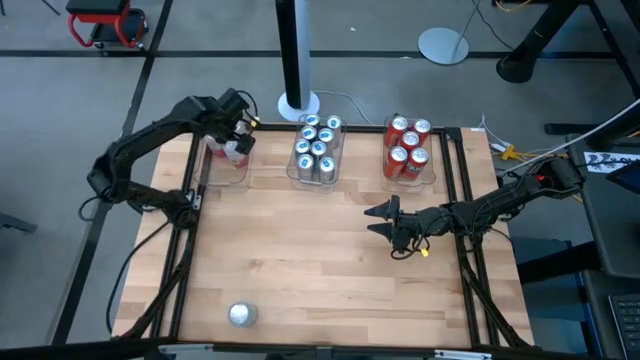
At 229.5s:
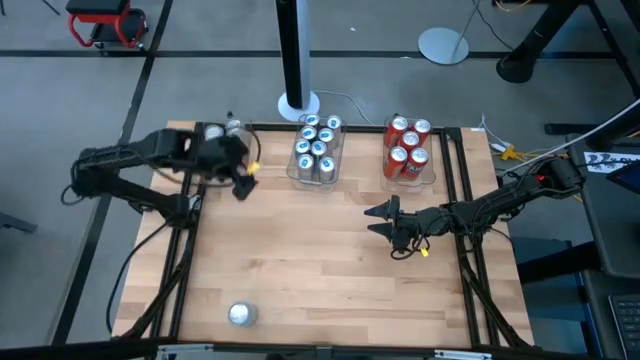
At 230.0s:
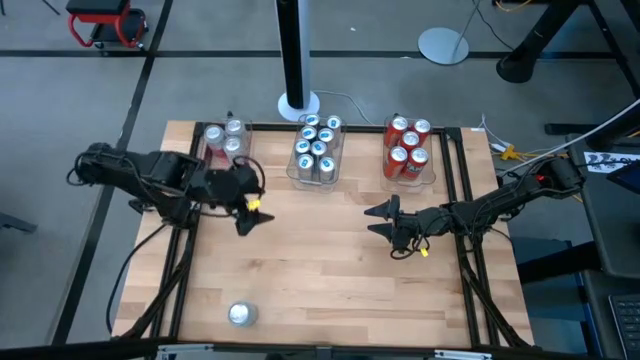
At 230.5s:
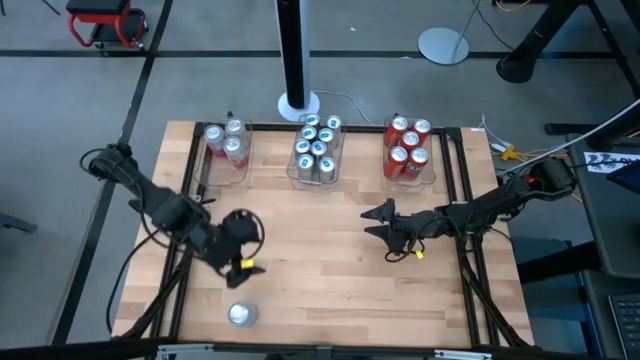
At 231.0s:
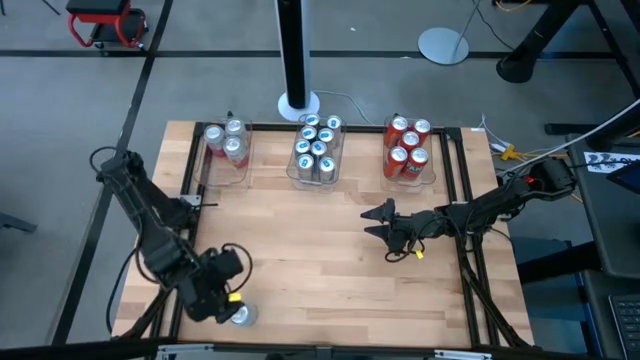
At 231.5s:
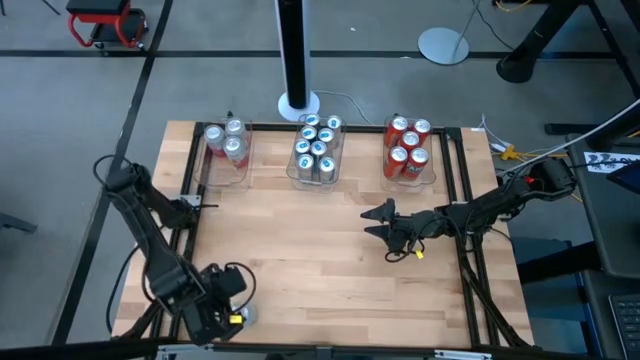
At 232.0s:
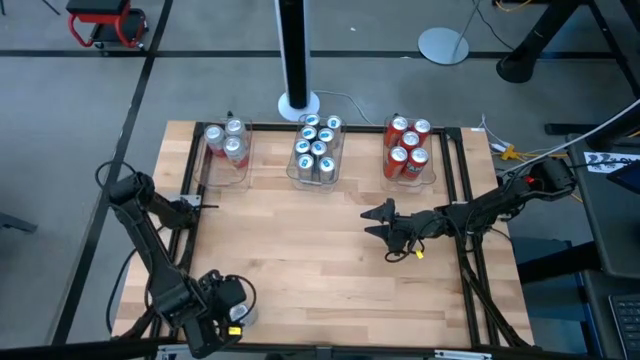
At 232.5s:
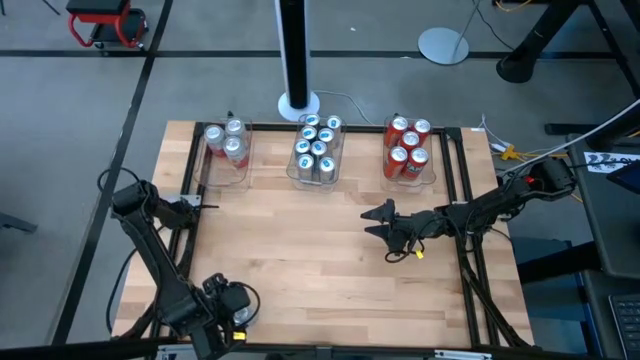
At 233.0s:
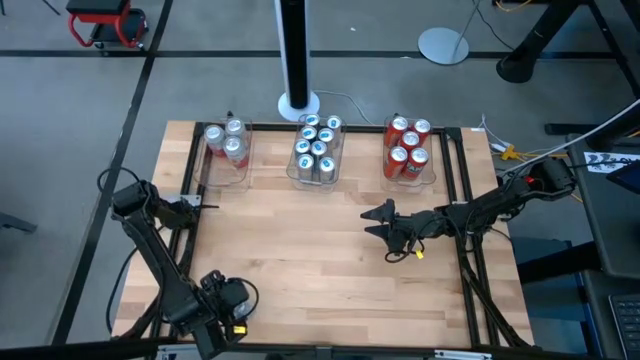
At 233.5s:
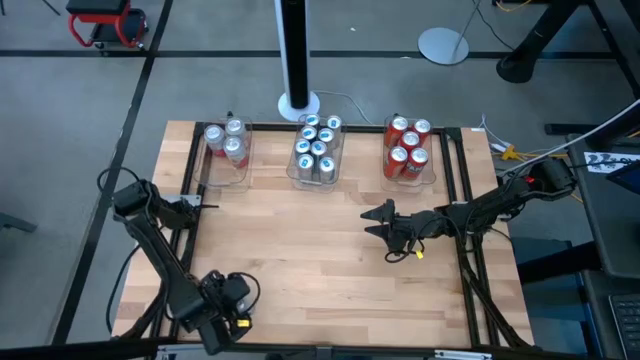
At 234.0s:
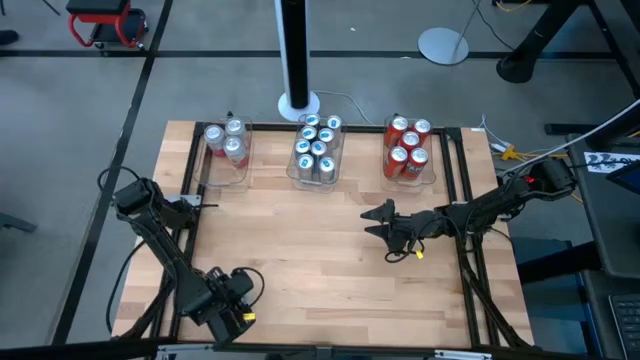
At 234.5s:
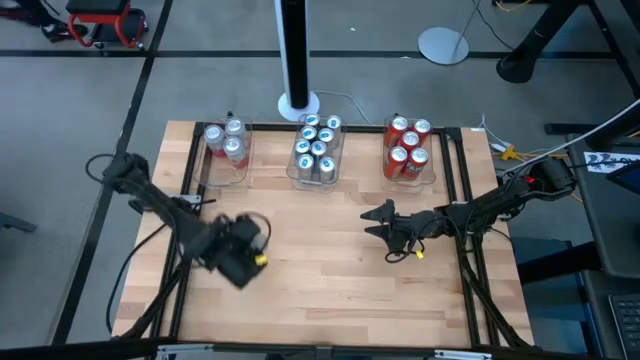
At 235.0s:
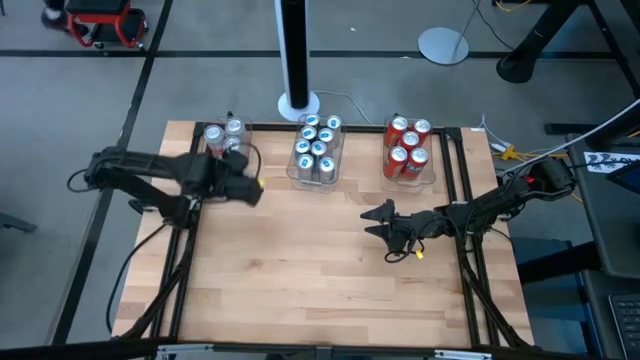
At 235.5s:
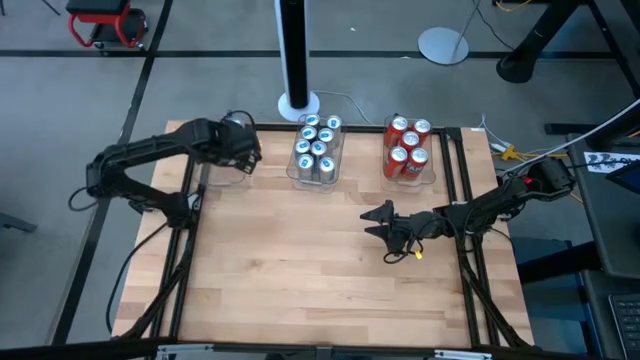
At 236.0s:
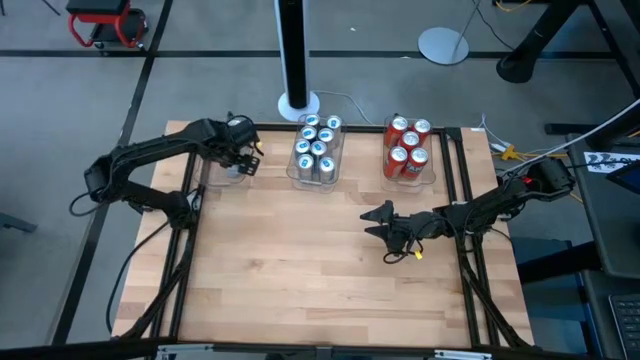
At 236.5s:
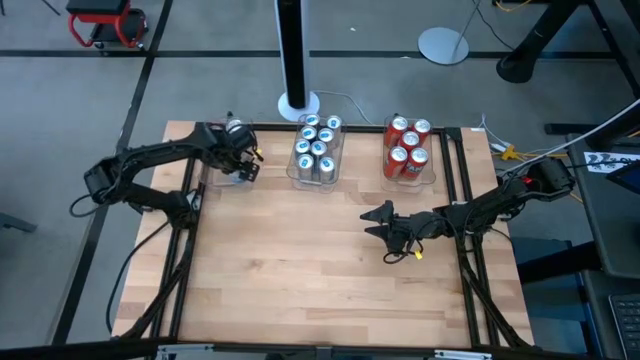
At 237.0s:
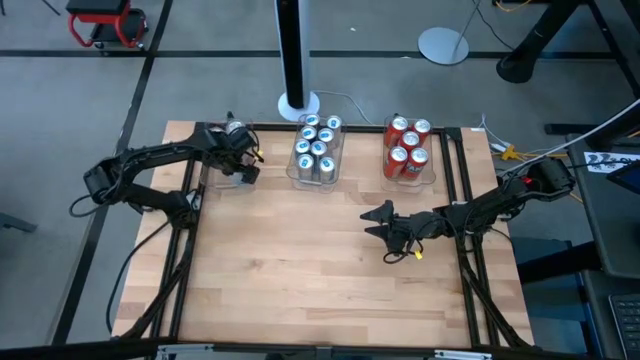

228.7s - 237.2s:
Task: Sort soda cans
Put the blue-white soda can into the left transparent bin

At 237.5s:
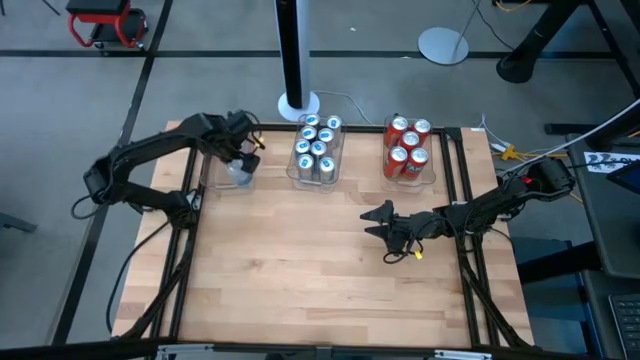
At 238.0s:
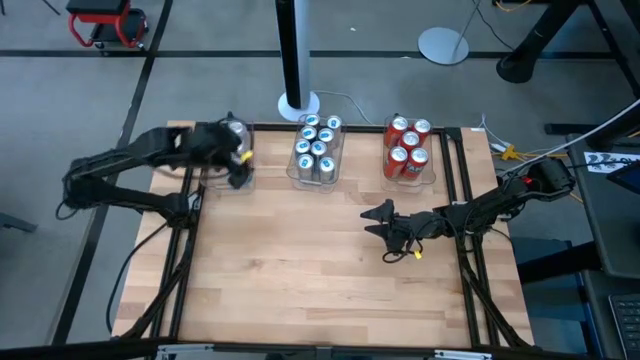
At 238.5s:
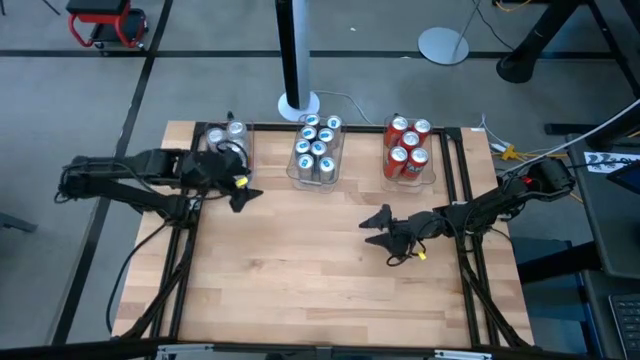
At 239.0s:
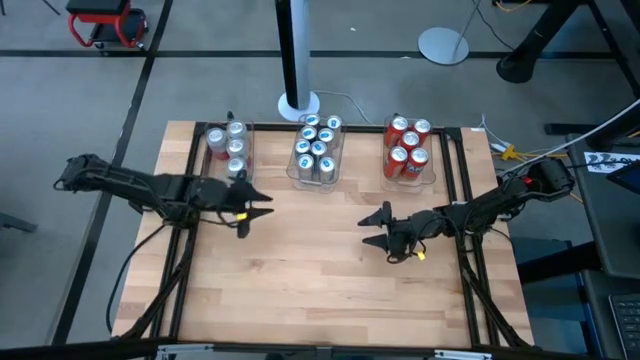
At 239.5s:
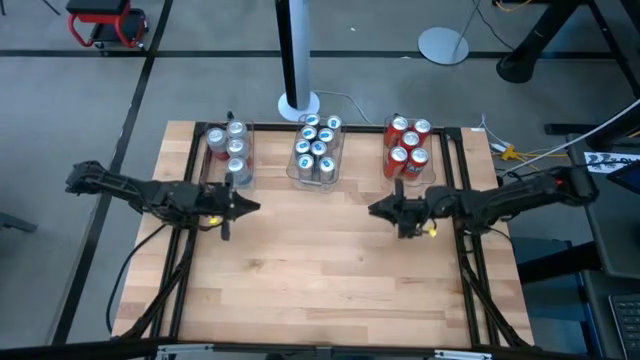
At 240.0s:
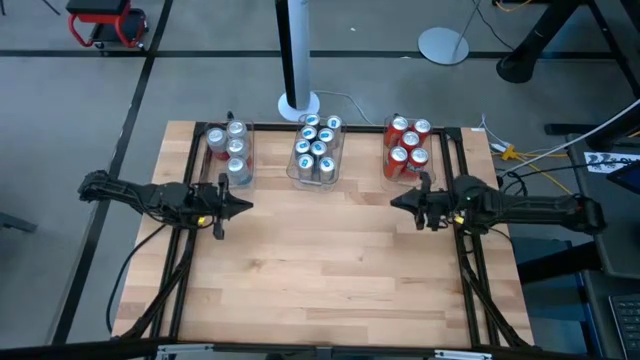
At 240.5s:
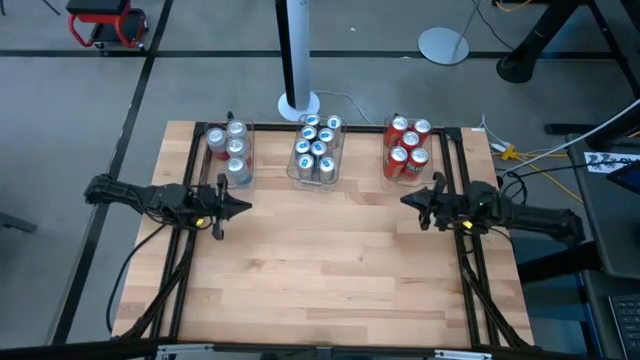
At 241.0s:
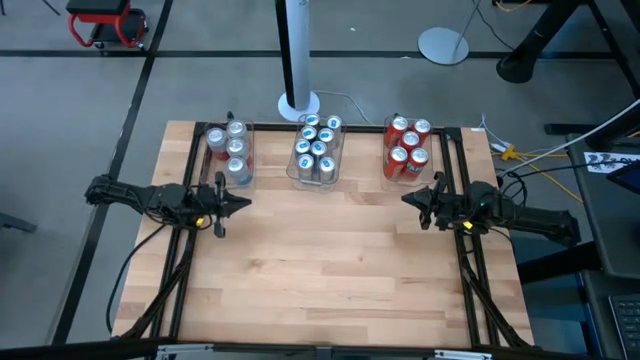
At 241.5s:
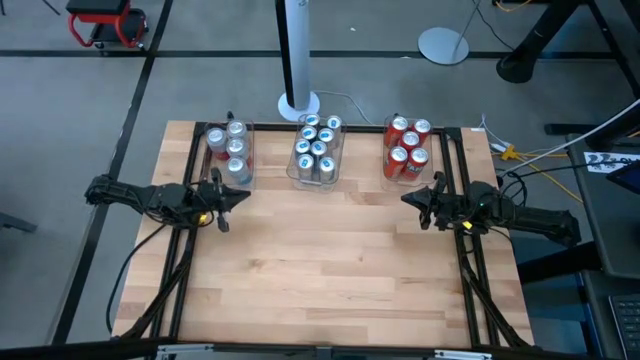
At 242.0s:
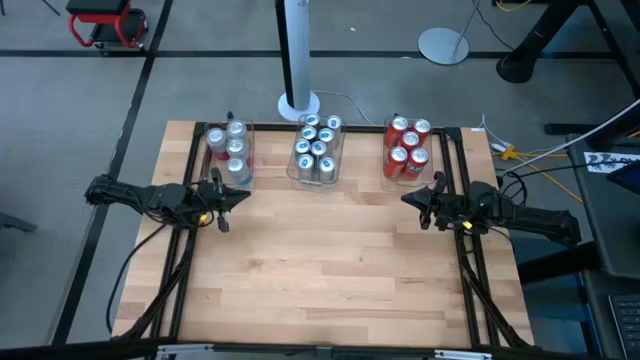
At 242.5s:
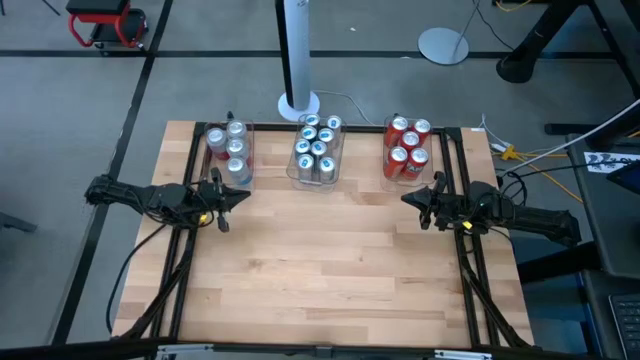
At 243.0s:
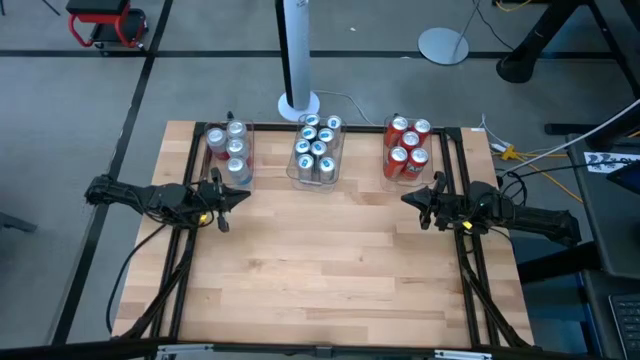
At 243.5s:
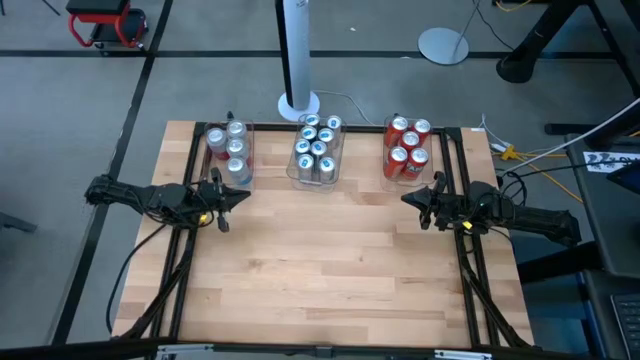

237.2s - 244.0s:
Return to Home Position

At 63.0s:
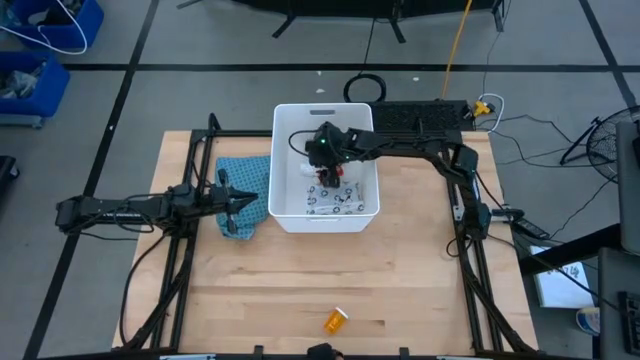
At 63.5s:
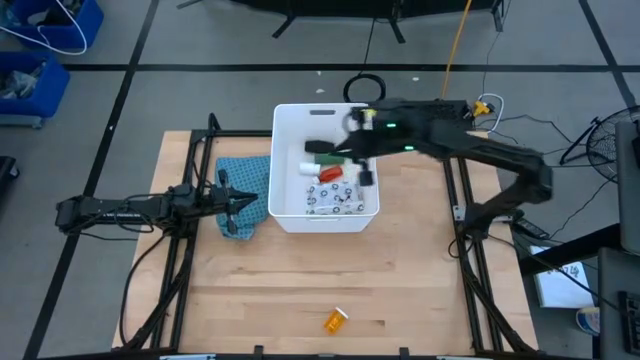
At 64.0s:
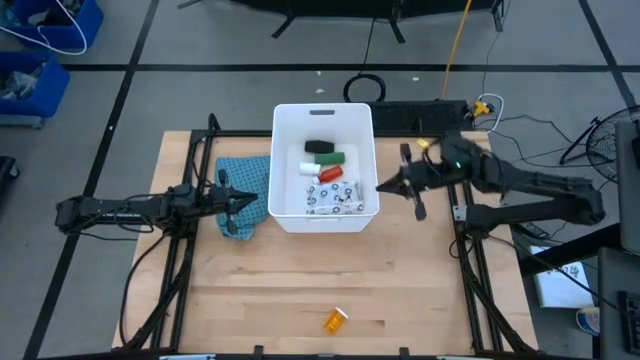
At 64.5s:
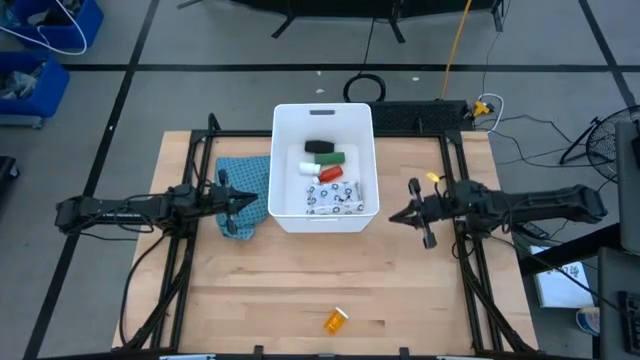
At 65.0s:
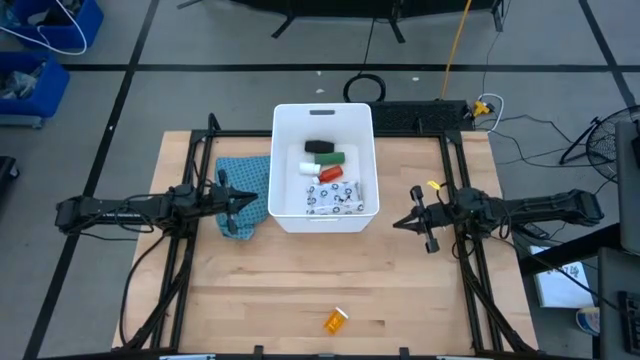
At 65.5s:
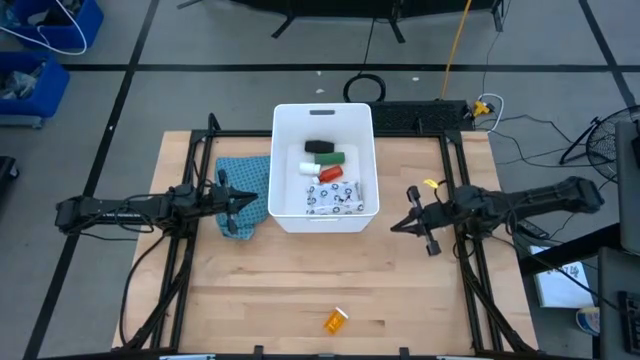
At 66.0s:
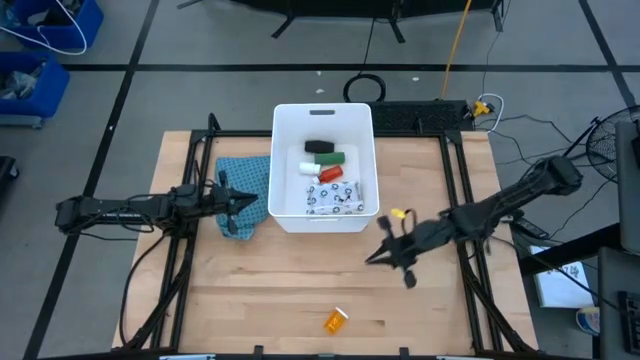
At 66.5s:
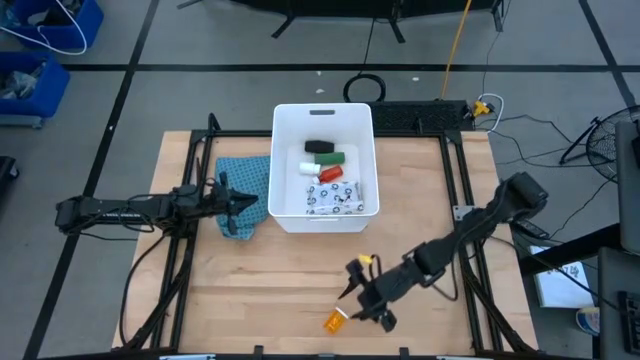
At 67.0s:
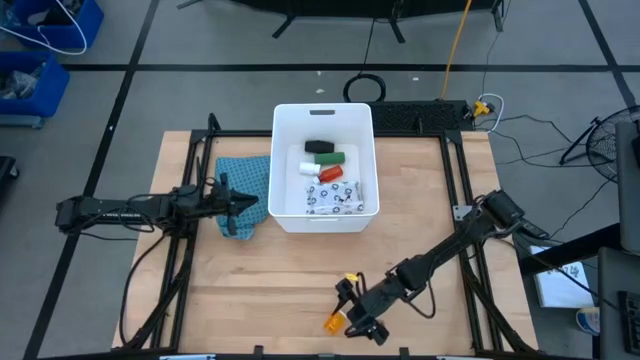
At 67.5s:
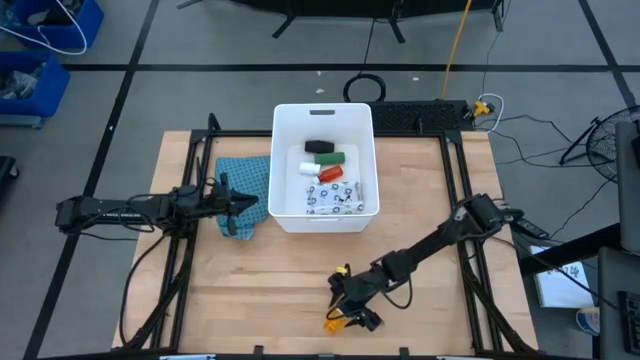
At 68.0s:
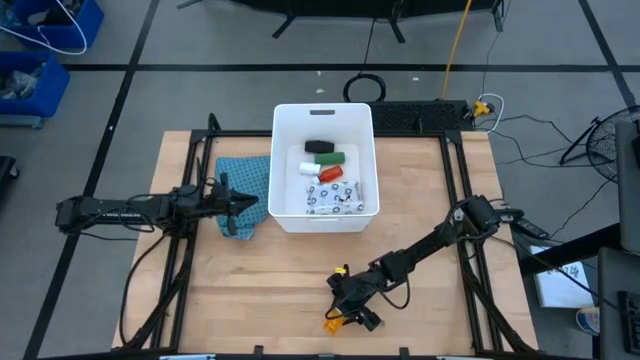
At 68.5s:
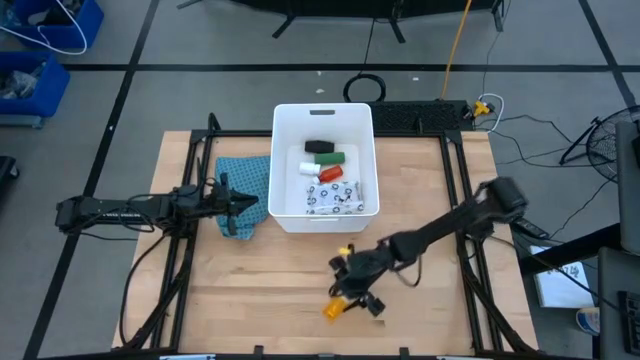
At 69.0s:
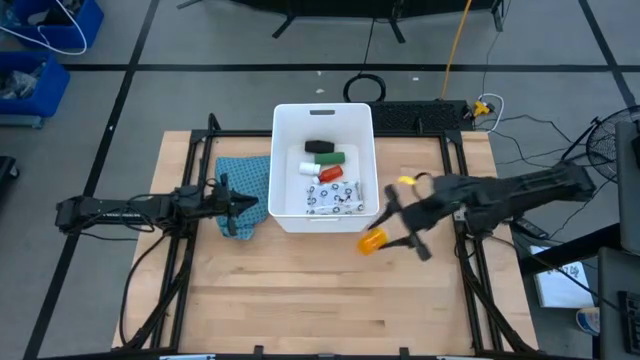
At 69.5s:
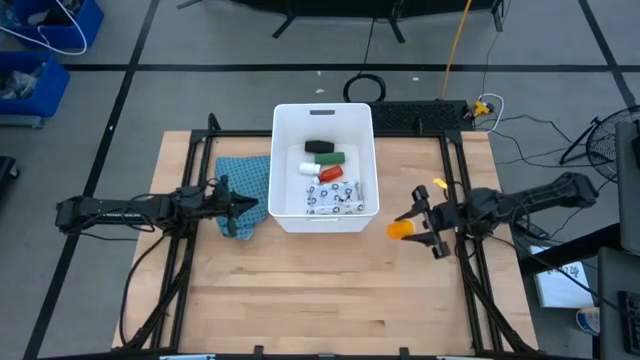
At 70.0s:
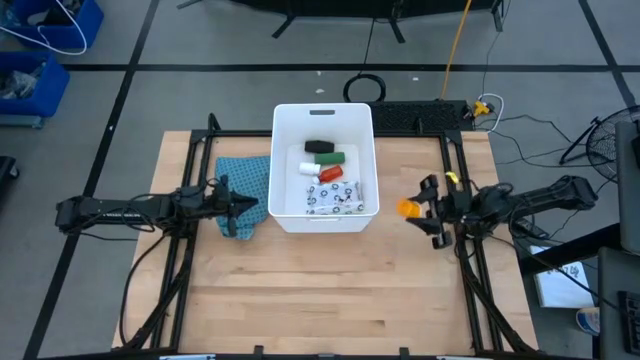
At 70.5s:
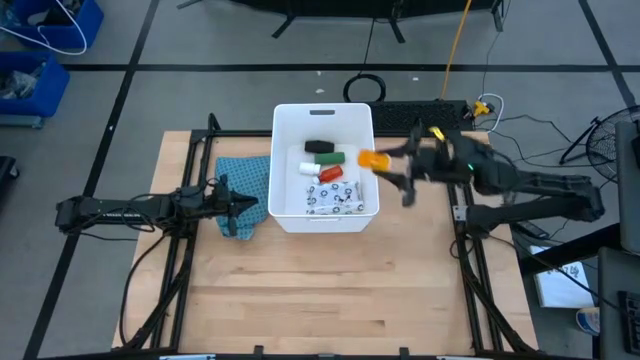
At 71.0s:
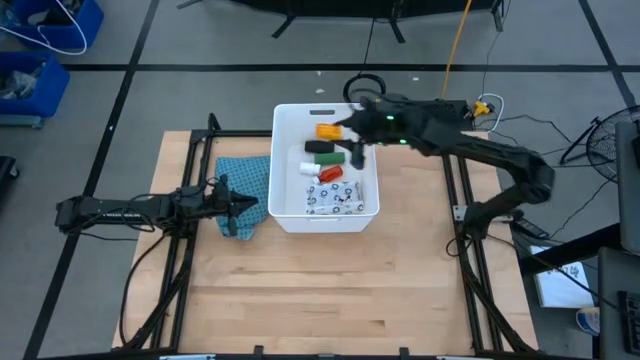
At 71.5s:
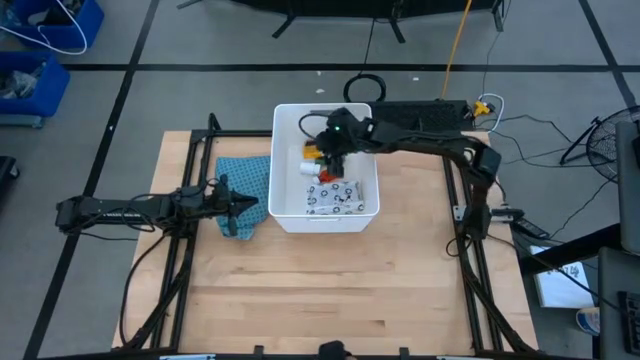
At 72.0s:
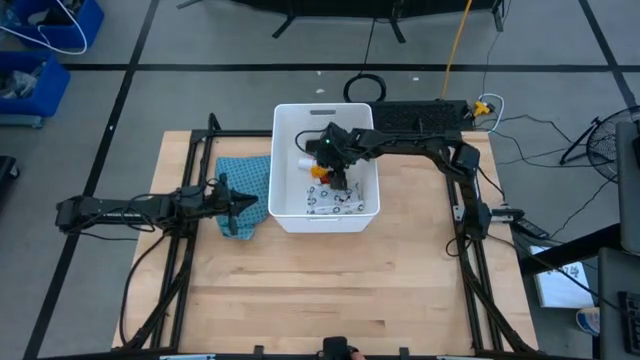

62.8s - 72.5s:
Task: Pick & place medical supplies in basket/bin
Put the orange pill bottle into the white container
